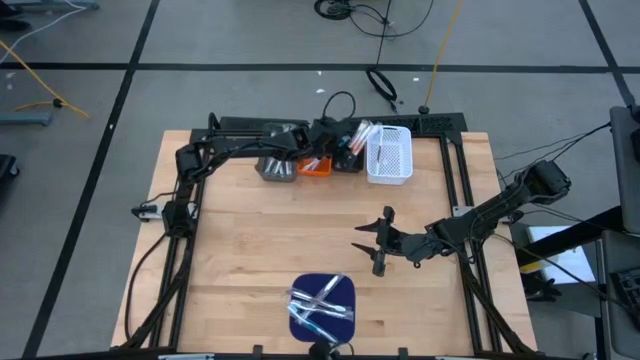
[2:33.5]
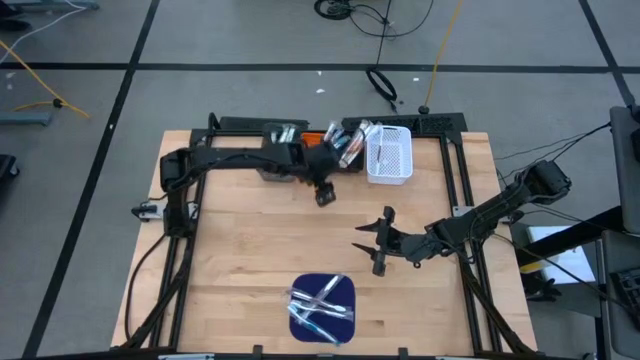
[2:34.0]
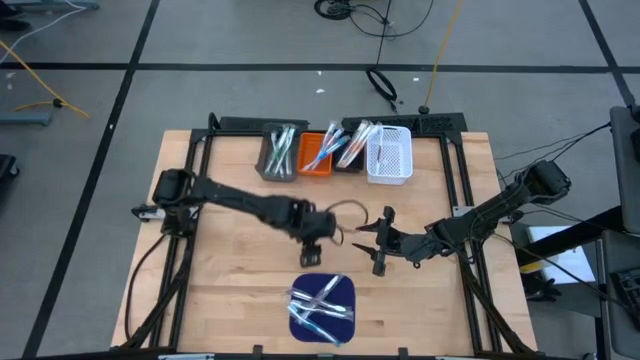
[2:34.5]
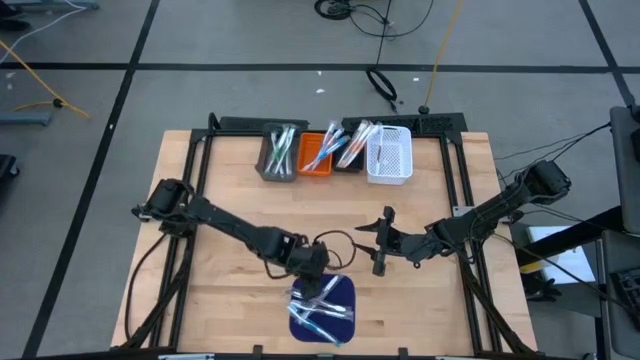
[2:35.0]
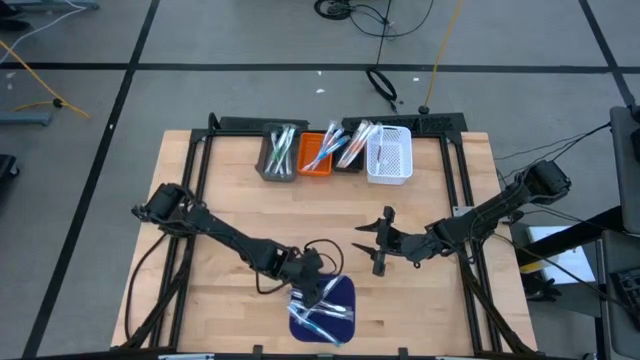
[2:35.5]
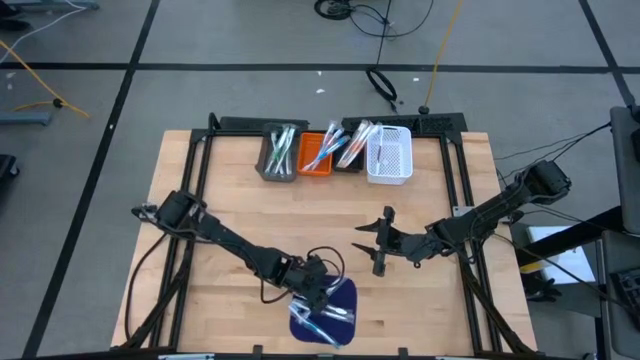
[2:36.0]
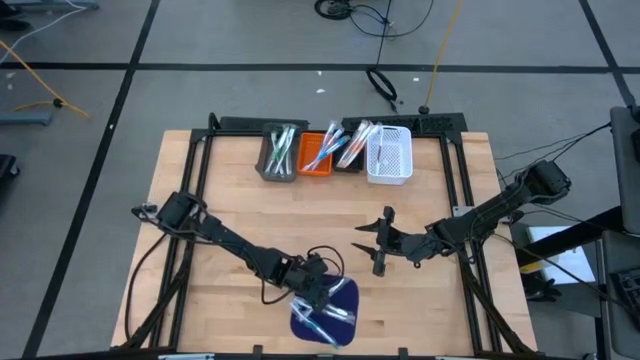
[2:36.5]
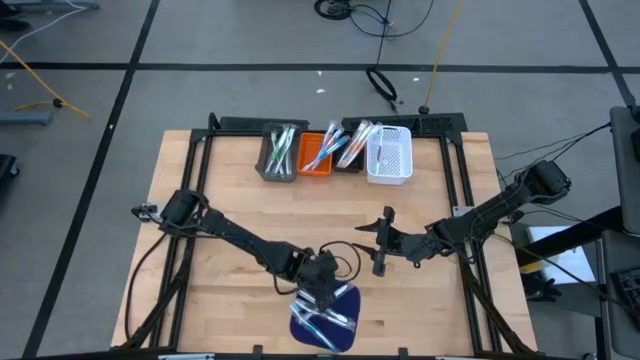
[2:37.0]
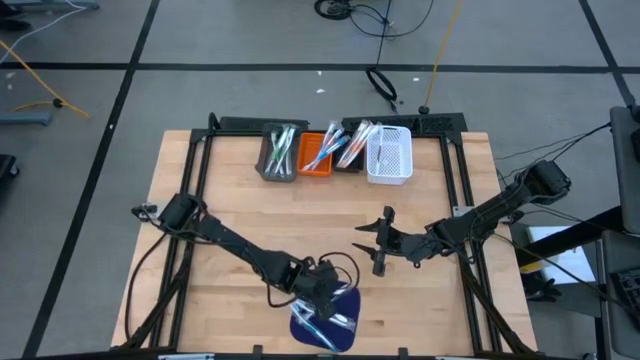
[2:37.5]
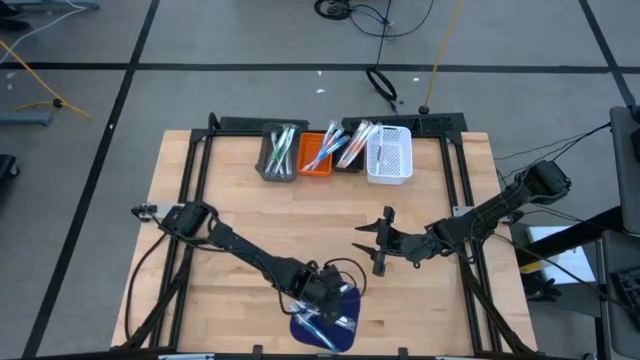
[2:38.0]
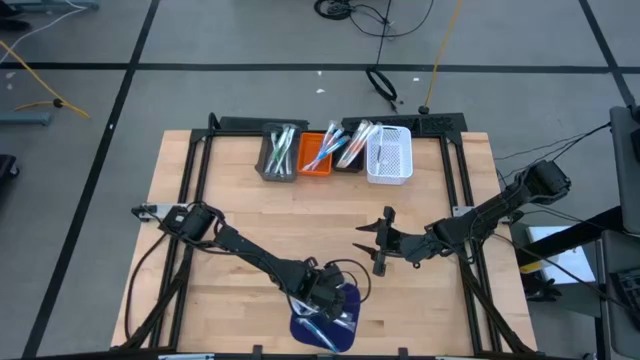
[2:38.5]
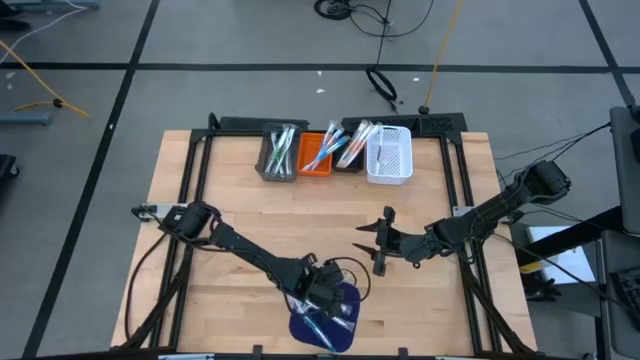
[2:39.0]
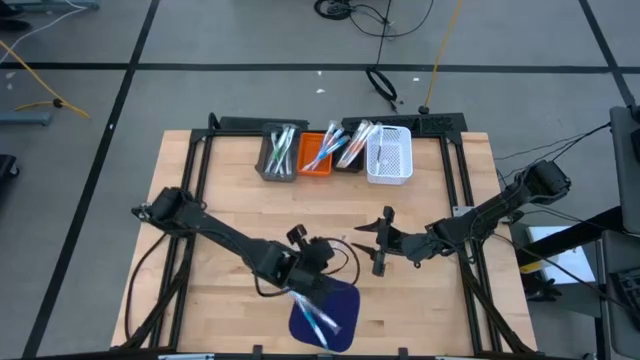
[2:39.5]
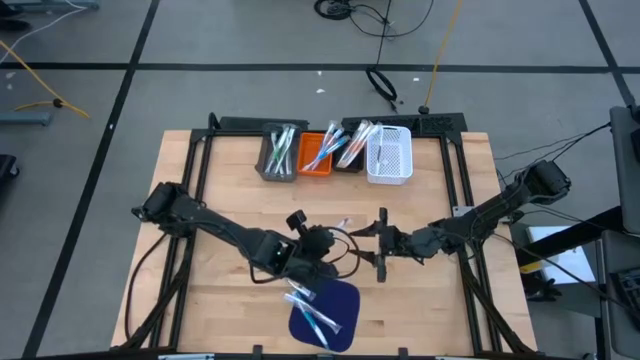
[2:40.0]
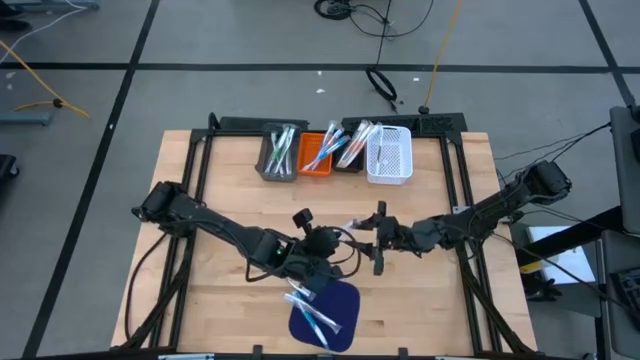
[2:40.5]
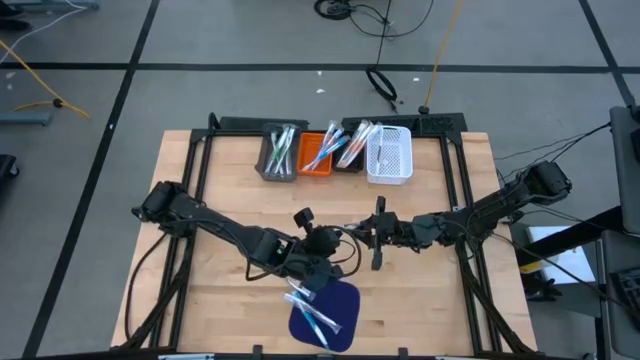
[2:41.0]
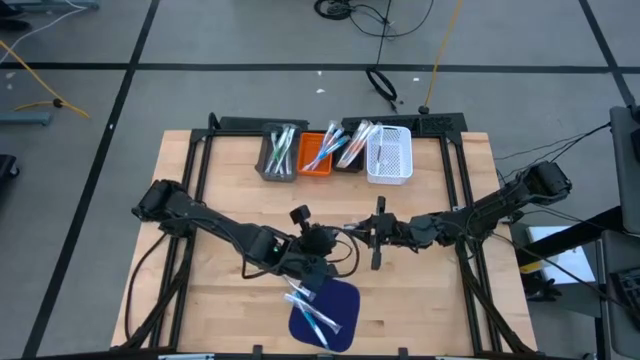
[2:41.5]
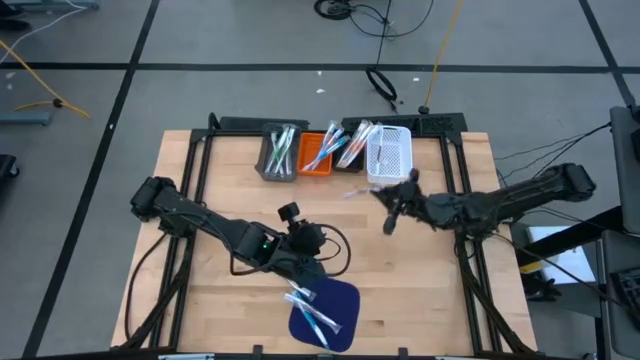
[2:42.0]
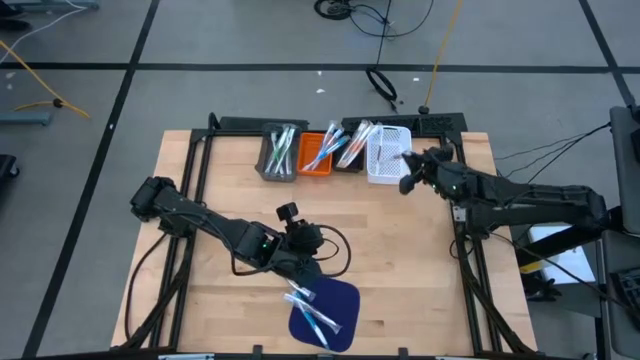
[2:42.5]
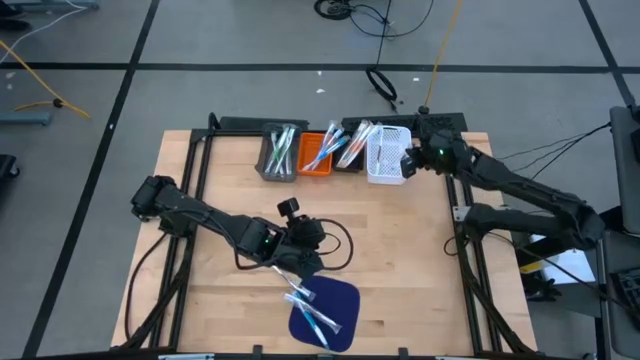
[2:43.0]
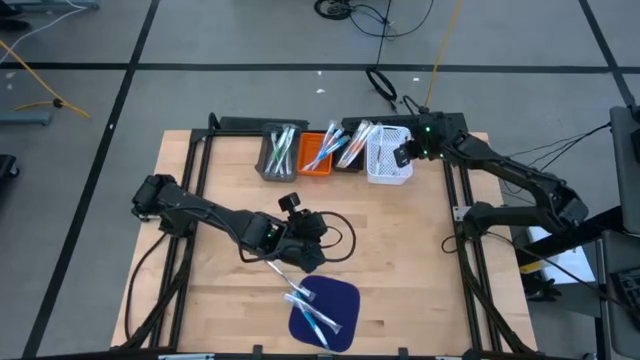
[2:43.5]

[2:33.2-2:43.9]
Task: Pick & Place Toothbrushes
Put the purple toothbrush into the white bin

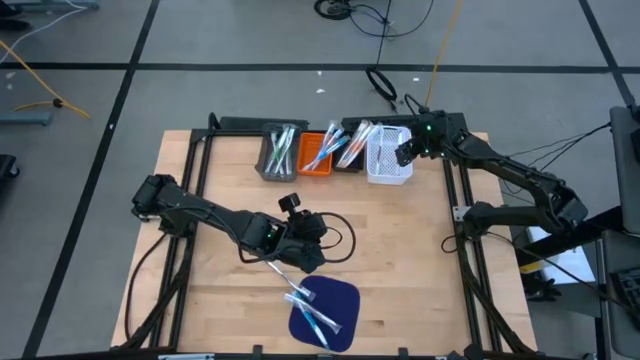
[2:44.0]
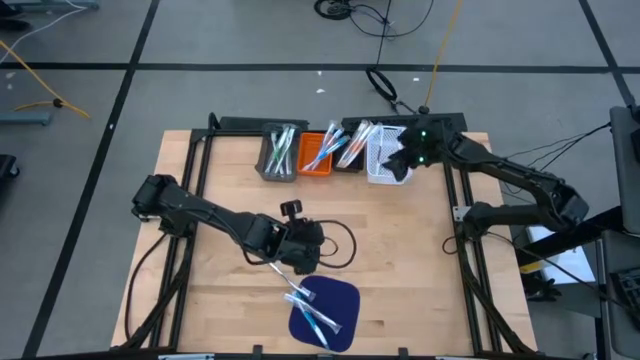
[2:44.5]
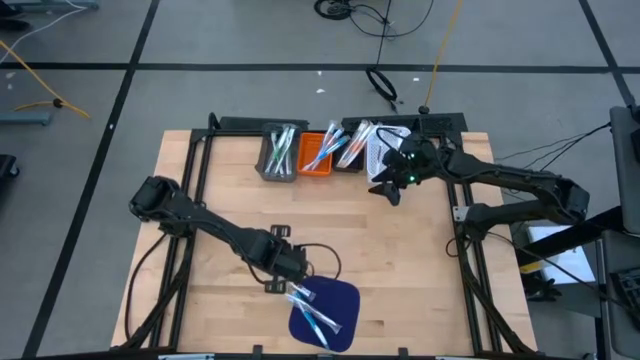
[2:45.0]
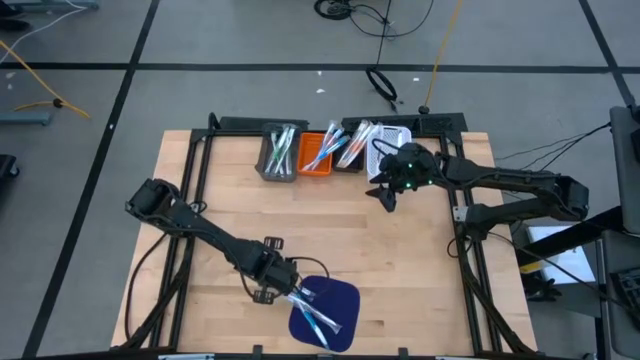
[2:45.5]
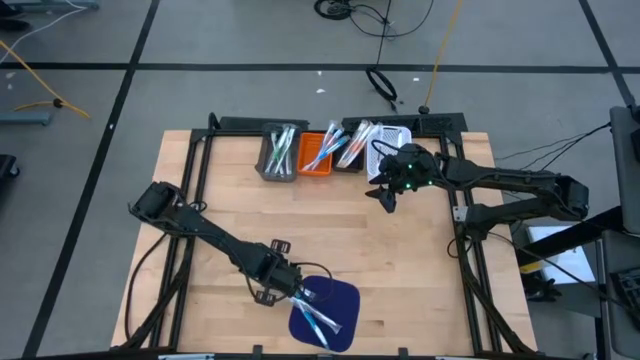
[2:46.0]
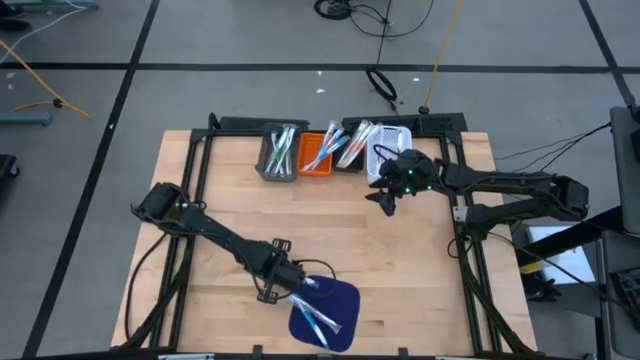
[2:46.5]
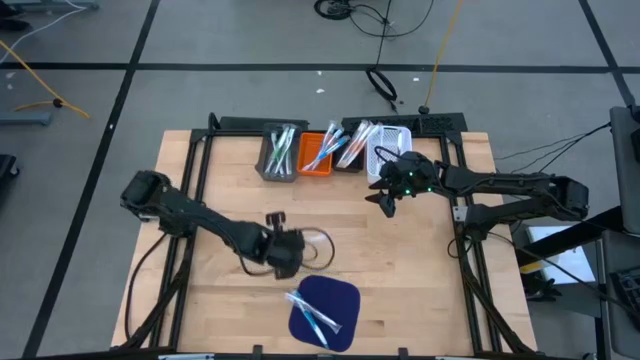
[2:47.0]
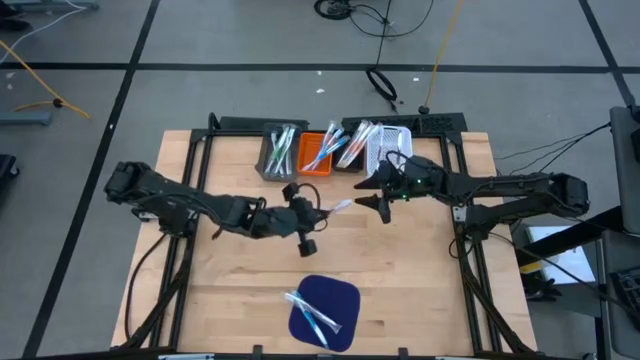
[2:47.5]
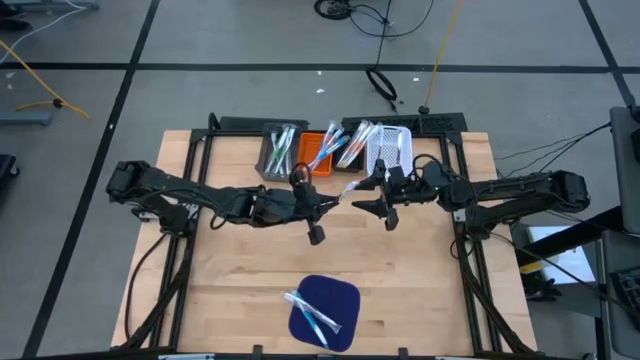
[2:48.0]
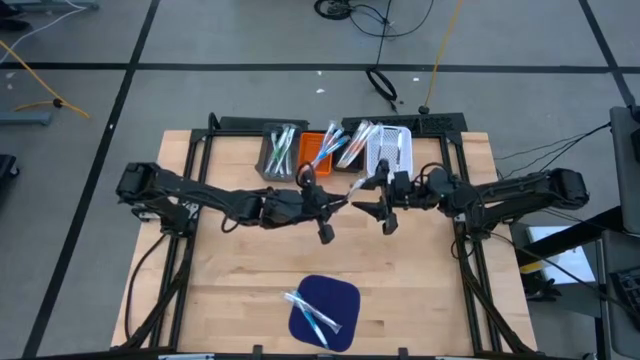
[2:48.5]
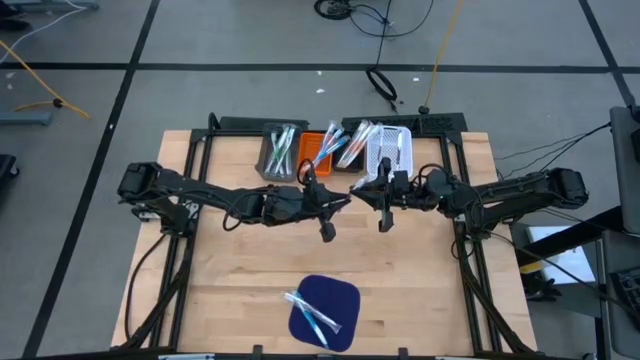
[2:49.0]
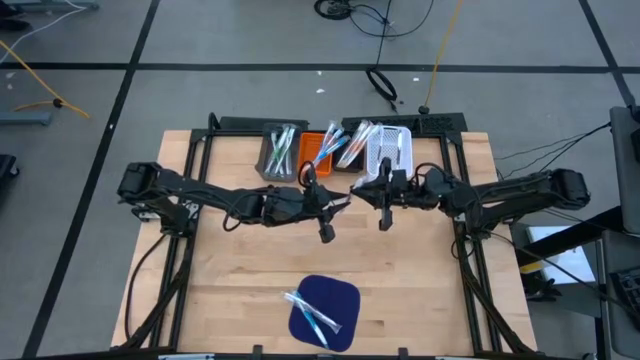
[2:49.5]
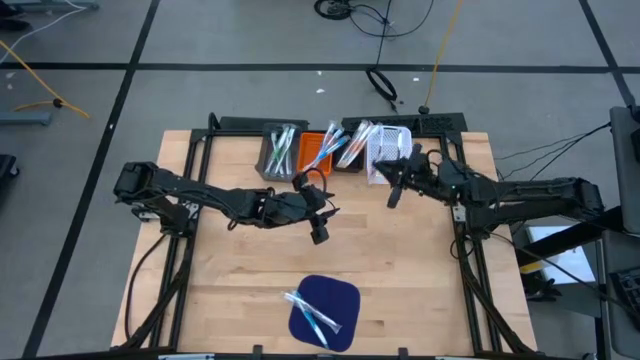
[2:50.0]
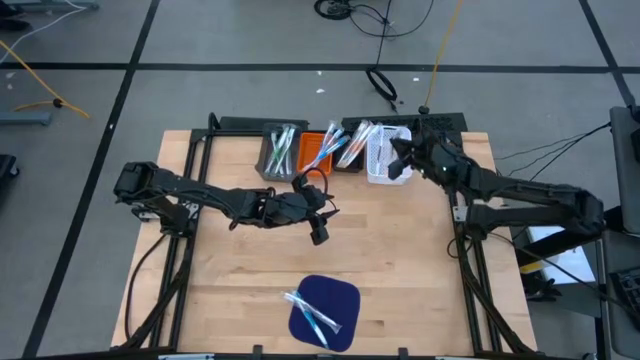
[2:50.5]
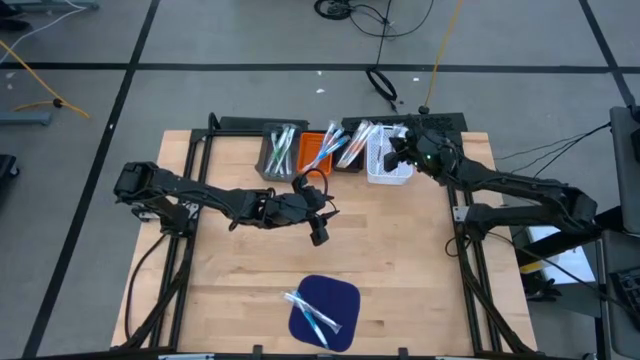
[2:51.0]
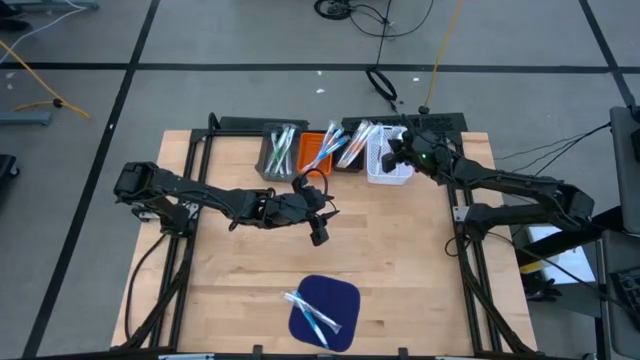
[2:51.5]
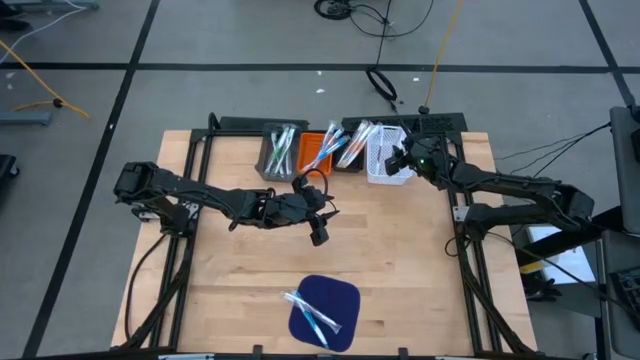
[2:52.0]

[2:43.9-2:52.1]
Put the purple toothbrush into the white bin

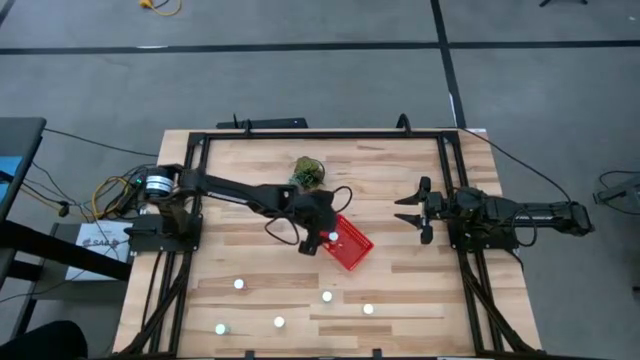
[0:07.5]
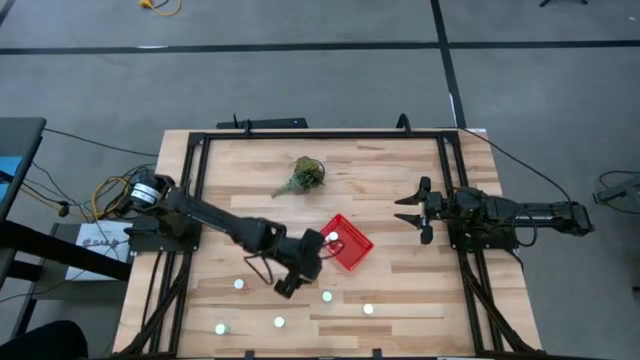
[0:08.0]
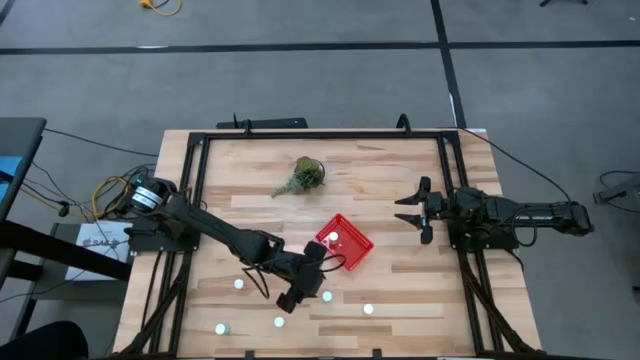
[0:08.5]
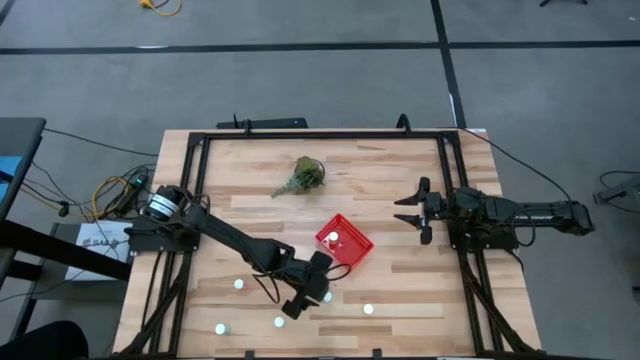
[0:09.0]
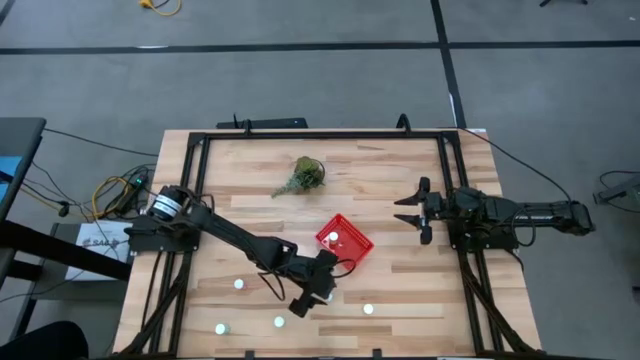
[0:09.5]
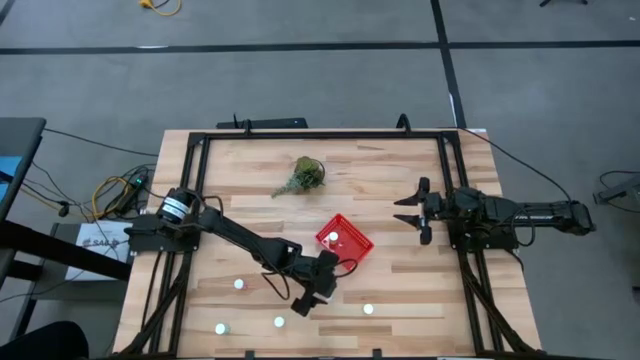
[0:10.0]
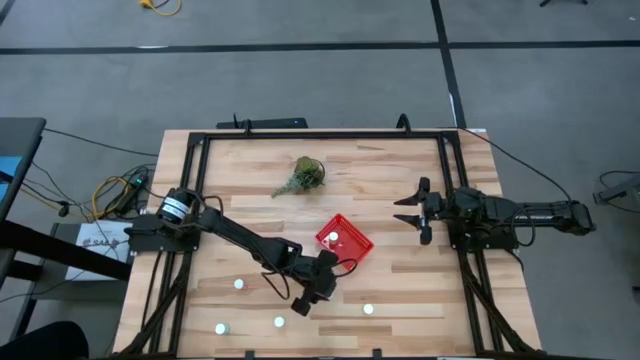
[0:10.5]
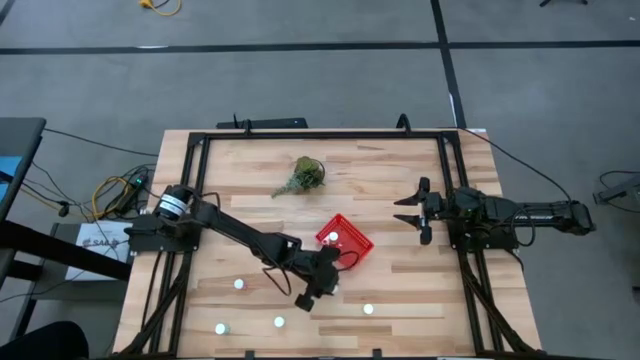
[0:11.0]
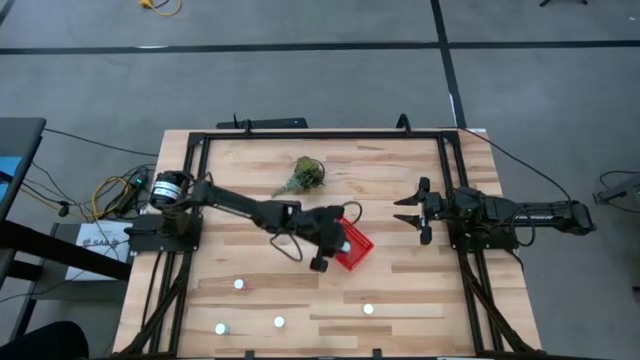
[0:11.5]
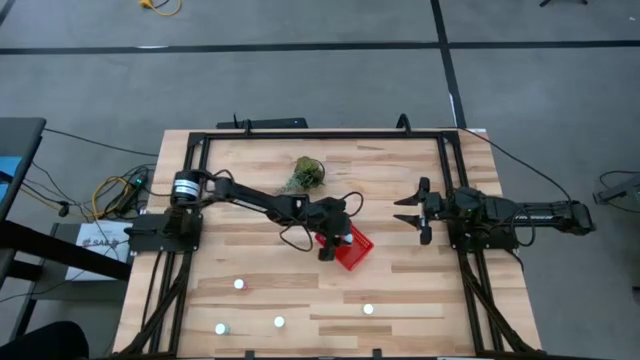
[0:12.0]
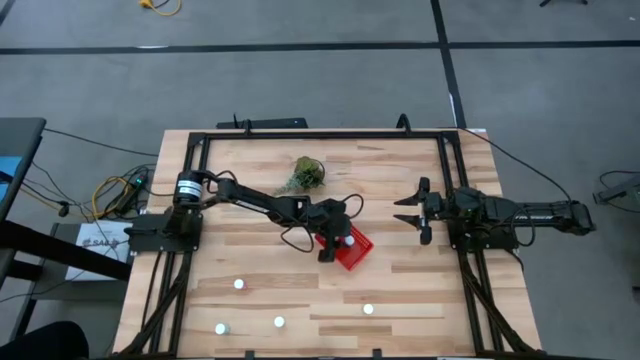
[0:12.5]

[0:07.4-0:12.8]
Task: Pick and place pill bottles into a basket
Put the right blue pill bottle into the red bin
